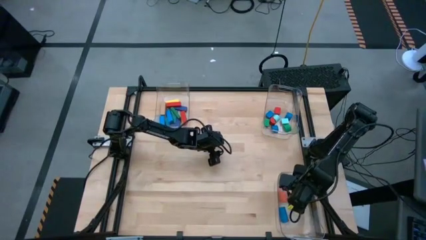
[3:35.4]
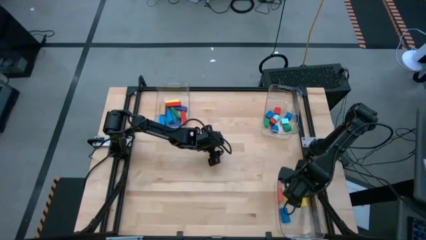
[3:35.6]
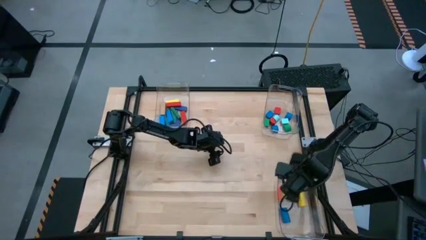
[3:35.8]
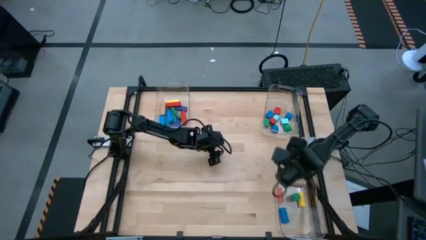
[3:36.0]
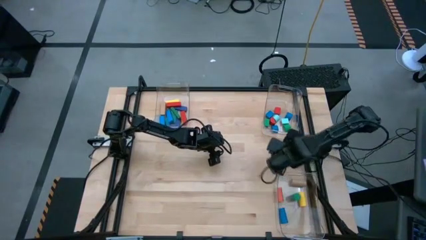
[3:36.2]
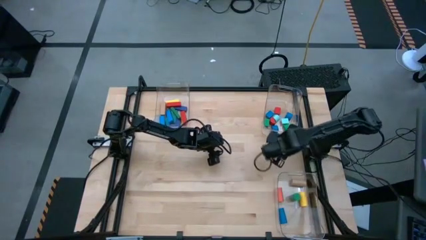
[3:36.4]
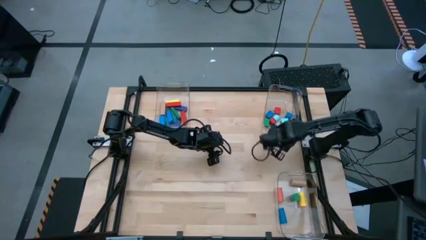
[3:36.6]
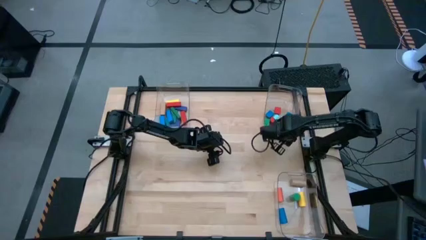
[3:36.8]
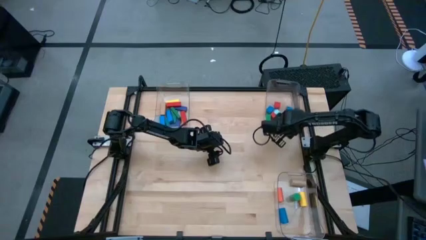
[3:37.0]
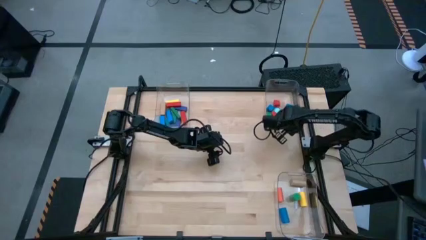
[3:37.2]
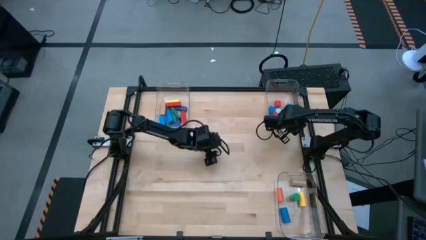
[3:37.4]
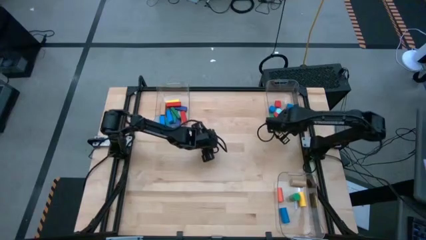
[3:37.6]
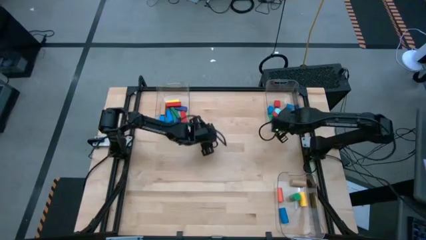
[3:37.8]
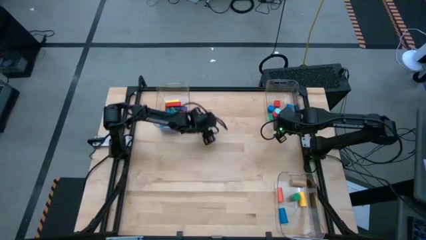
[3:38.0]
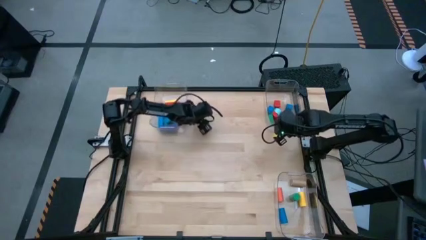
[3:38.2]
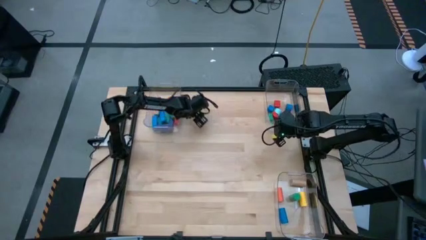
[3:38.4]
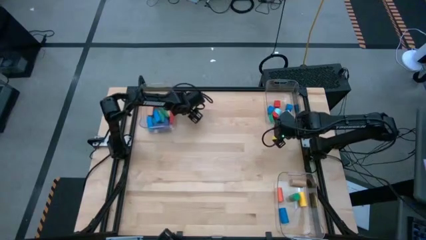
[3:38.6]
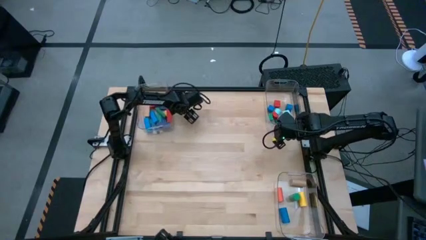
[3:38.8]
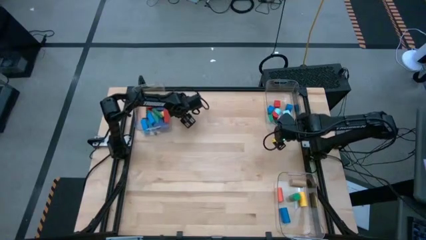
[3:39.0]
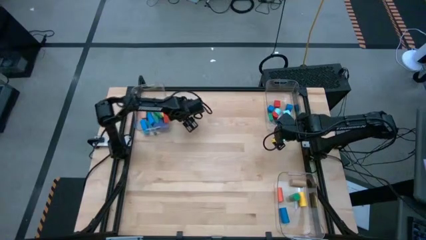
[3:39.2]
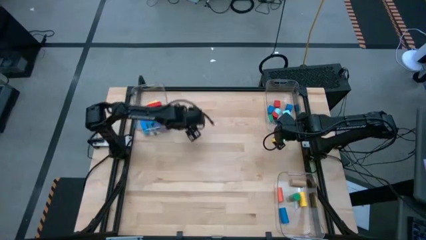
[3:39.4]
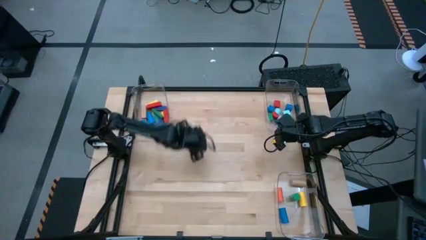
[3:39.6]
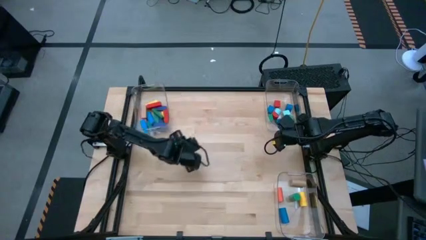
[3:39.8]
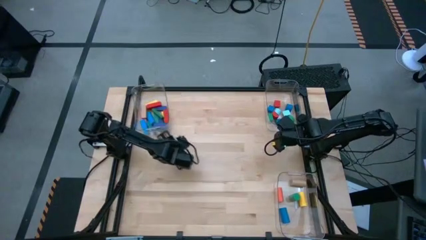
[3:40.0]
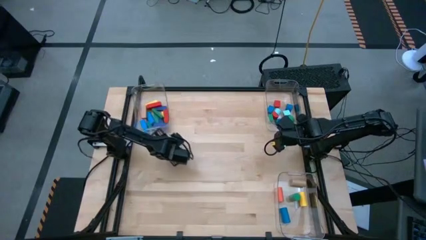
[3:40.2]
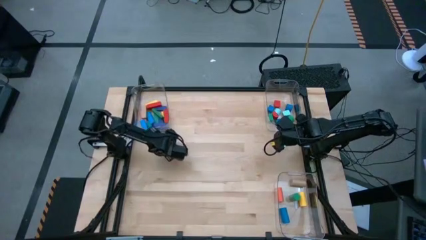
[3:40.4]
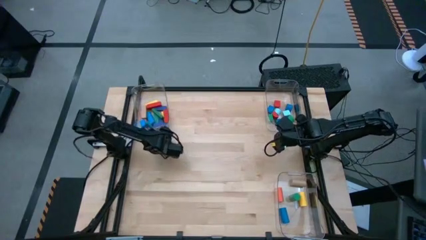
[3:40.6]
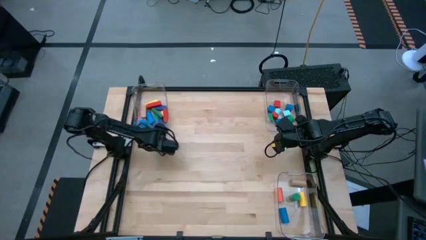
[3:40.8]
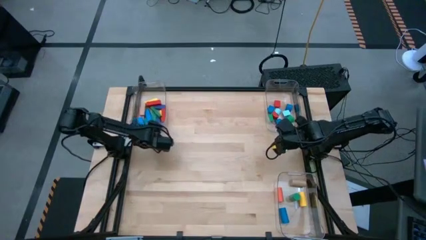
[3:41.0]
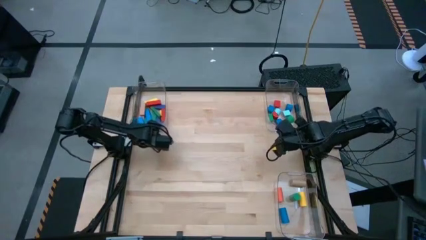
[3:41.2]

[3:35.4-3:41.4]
Task: Sort blocks by size
Adjust the transparent bins

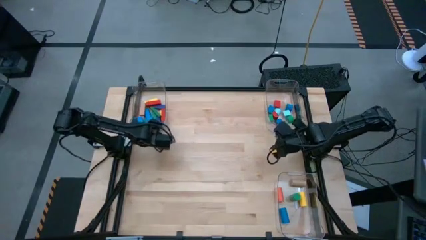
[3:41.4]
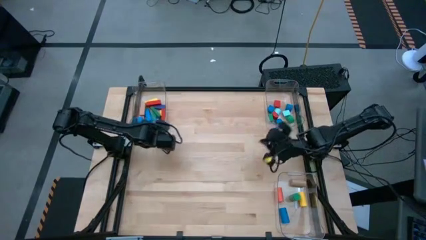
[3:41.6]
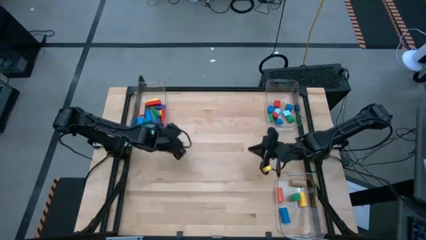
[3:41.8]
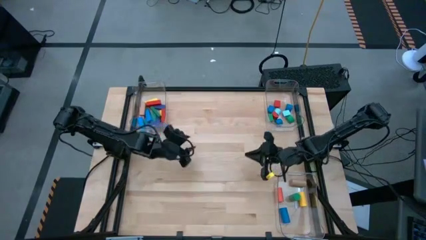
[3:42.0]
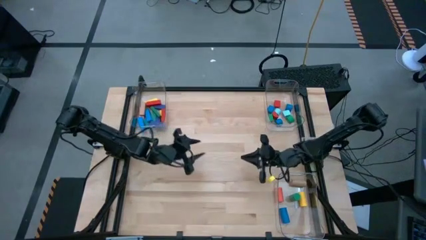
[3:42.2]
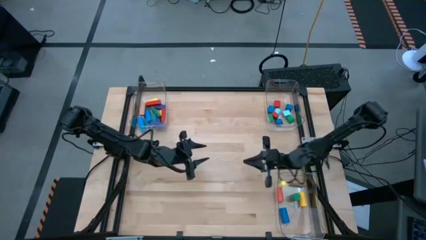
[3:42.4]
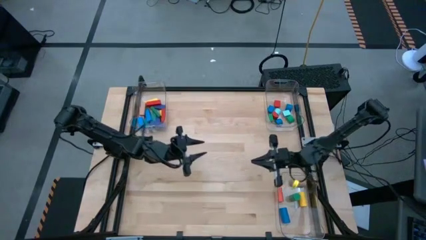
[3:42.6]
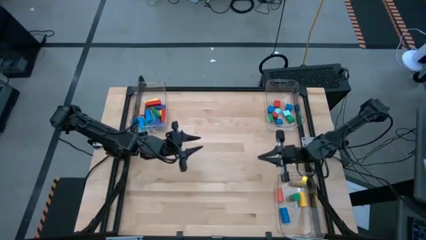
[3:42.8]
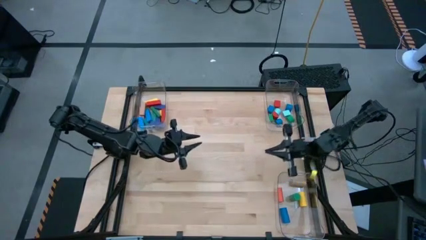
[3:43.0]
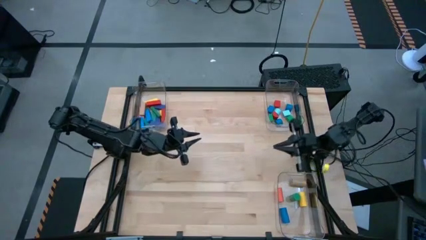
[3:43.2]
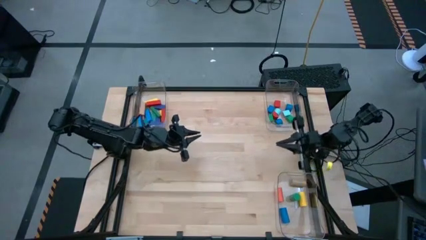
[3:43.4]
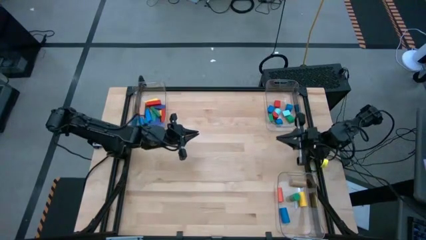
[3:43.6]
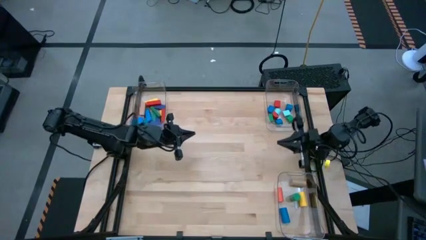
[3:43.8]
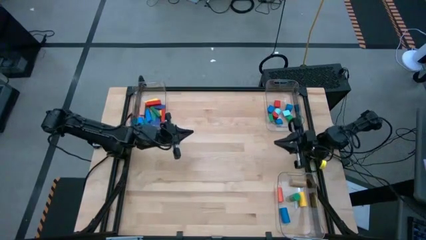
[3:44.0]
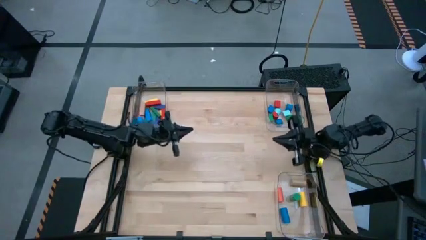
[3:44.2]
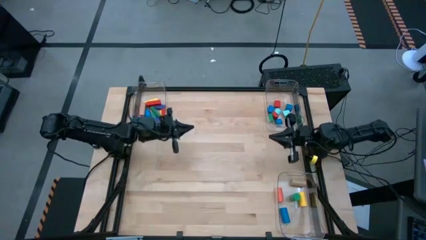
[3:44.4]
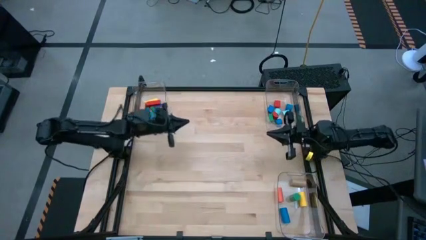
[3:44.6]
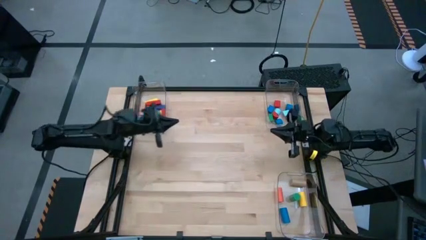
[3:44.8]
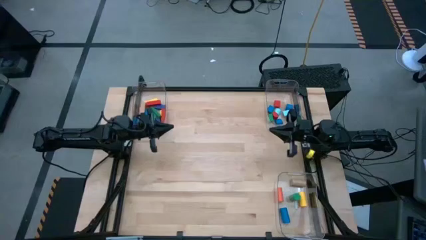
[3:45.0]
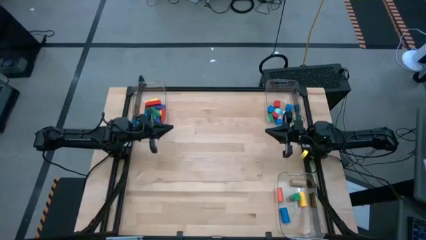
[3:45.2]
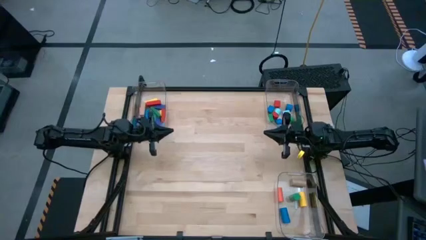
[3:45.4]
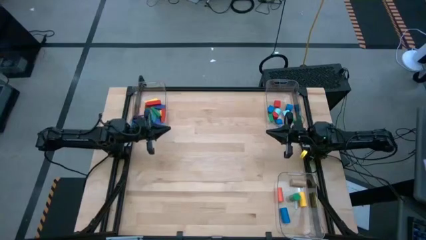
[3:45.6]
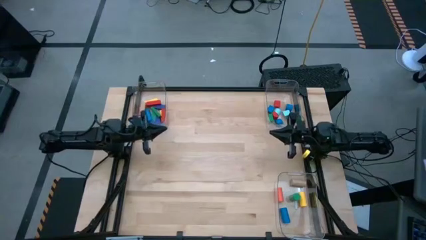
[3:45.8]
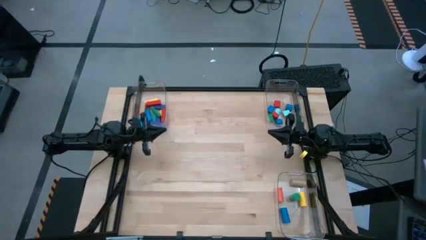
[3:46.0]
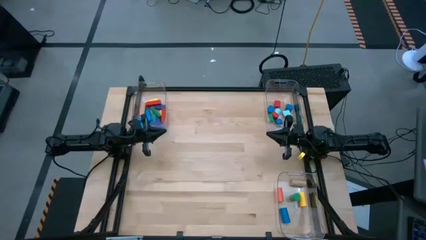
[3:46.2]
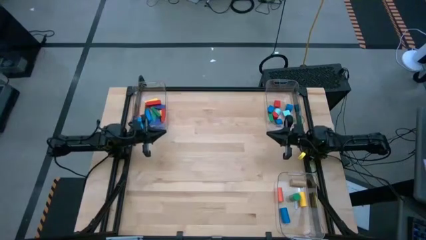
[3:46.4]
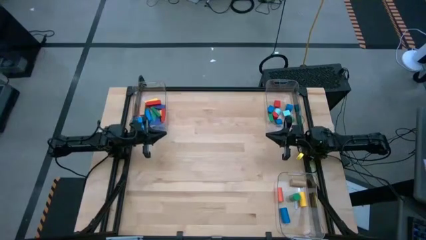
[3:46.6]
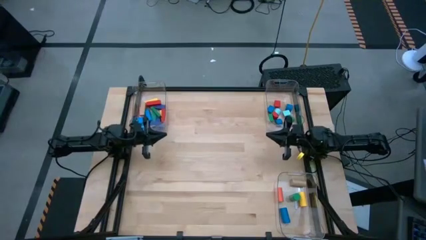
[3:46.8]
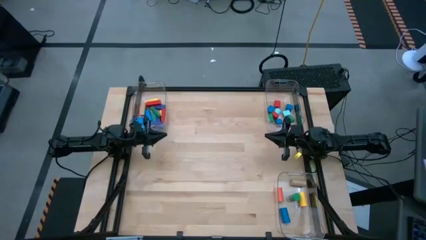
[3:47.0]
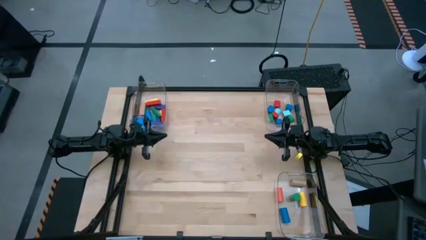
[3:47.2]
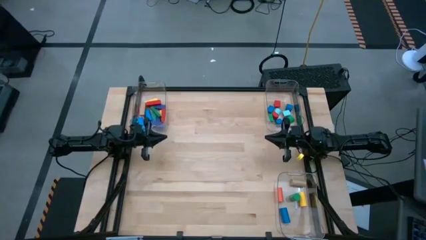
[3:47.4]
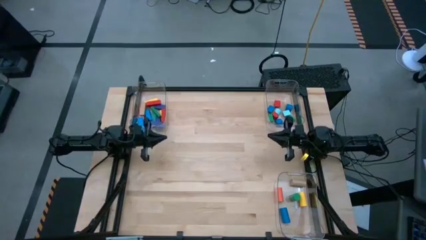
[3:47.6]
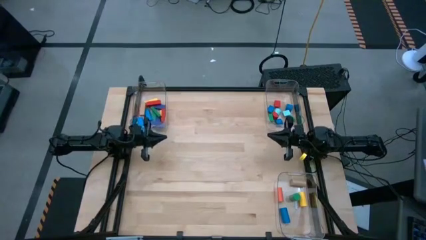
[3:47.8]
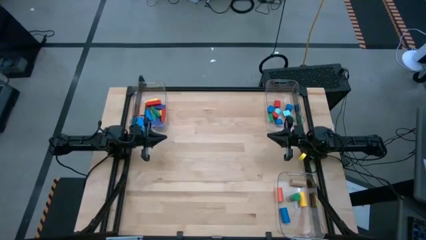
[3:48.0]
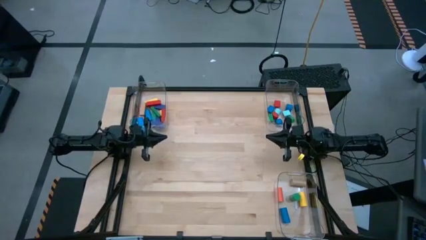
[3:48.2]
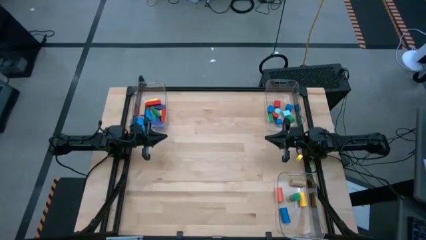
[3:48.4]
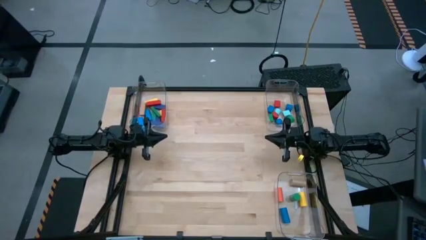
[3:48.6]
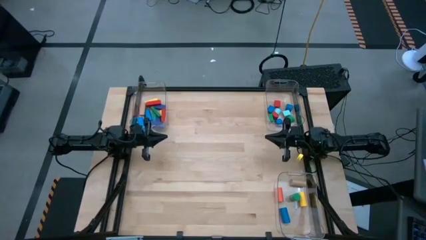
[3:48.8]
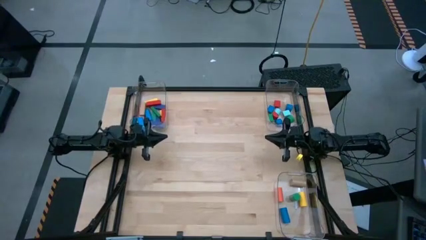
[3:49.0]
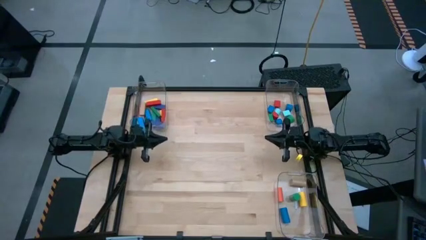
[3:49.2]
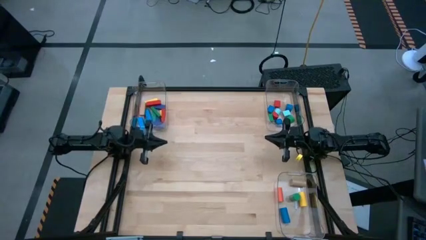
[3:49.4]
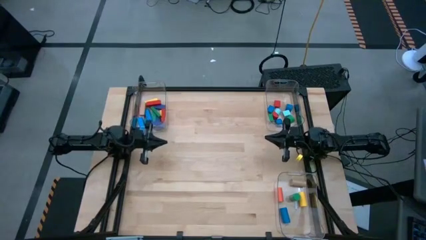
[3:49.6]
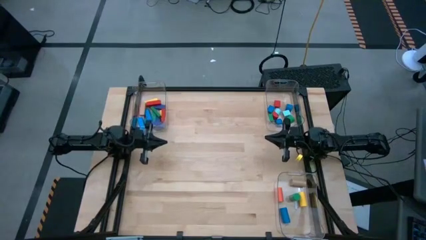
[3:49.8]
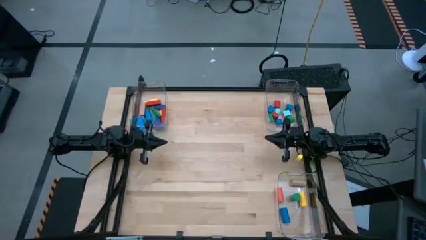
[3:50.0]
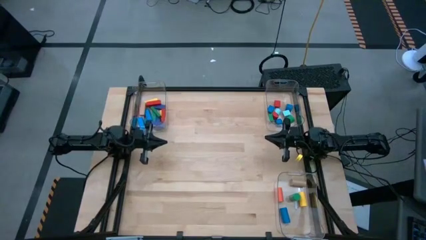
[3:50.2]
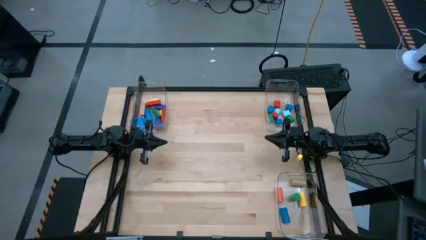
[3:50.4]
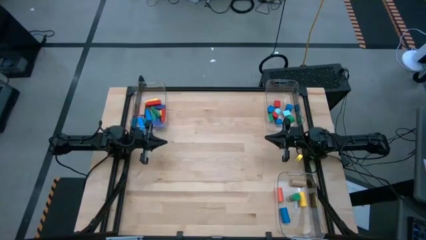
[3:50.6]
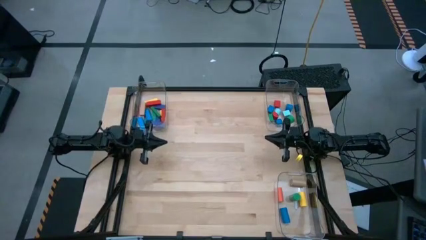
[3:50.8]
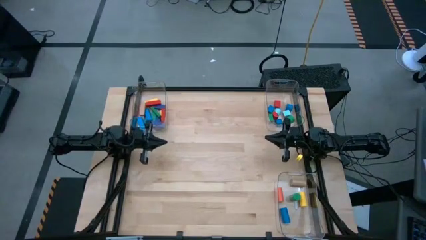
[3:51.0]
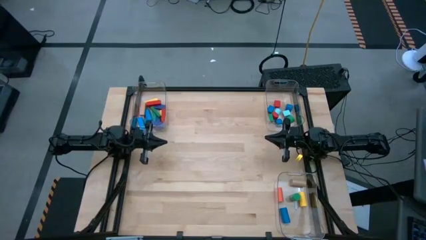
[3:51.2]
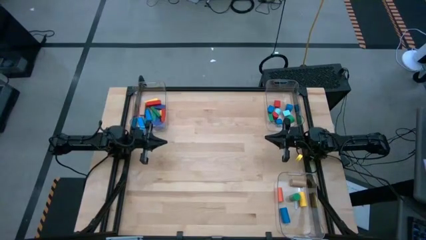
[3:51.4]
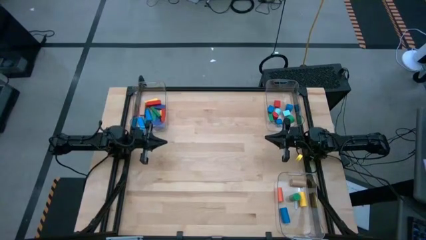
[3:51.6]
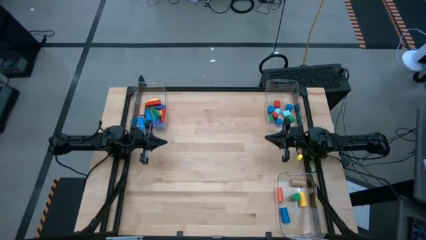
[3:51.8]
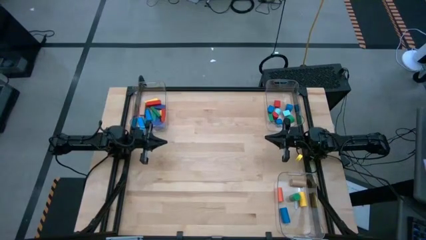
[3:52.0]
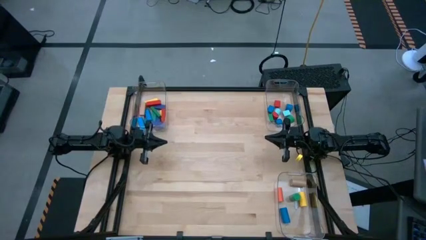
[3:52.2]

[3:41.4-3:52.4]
Return to Home Position
